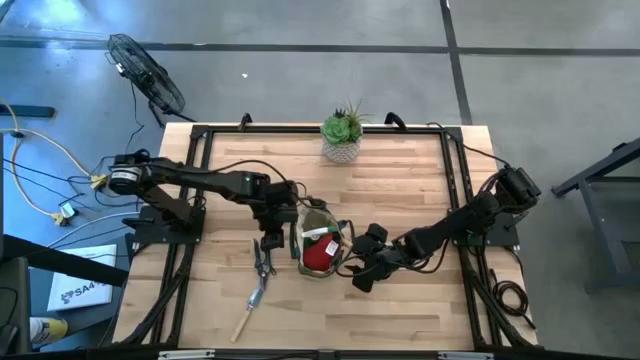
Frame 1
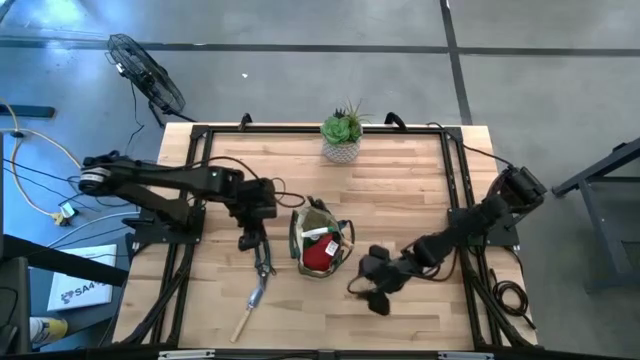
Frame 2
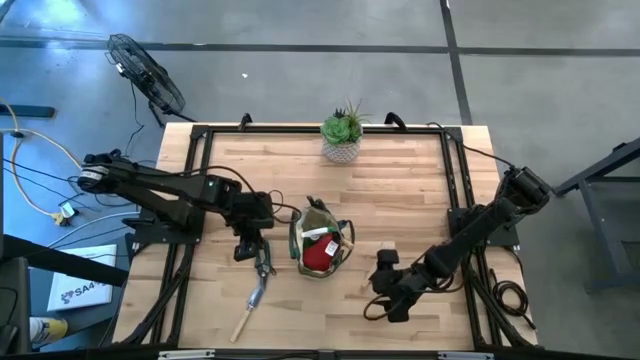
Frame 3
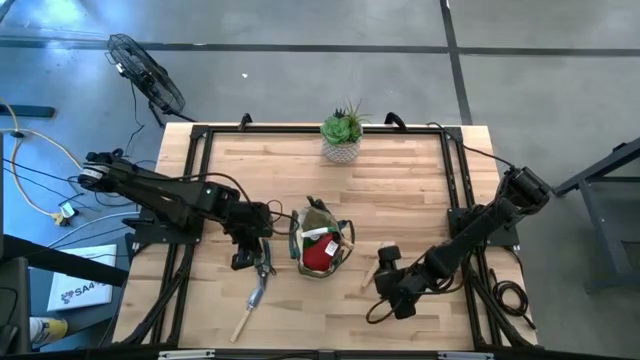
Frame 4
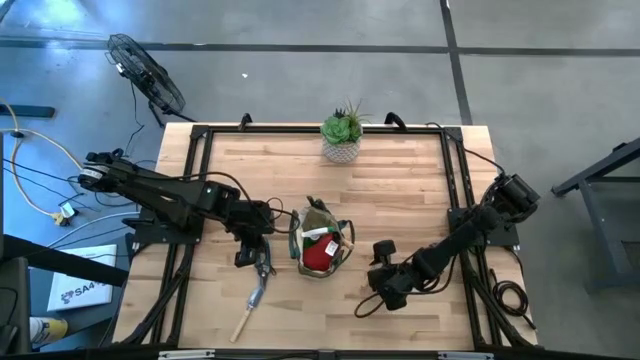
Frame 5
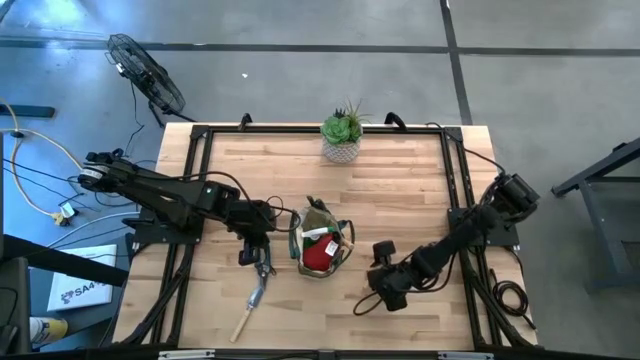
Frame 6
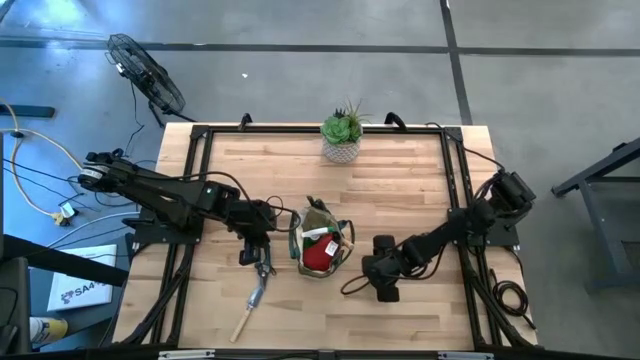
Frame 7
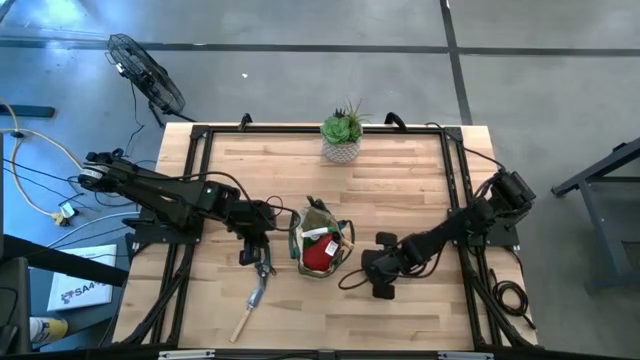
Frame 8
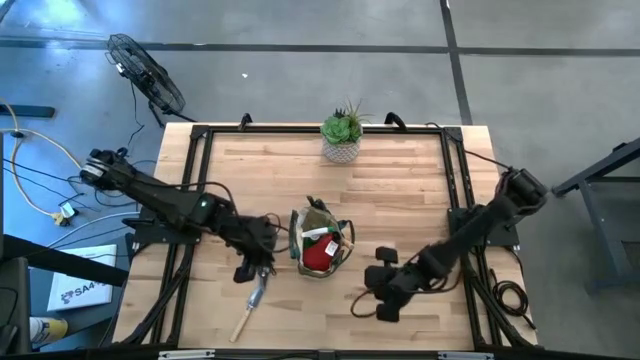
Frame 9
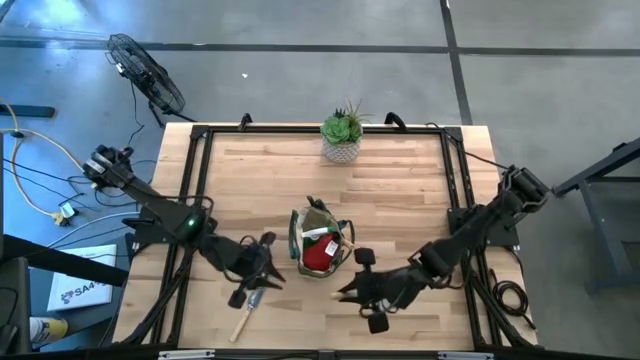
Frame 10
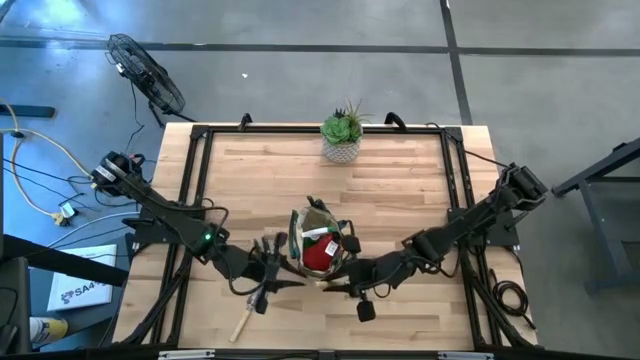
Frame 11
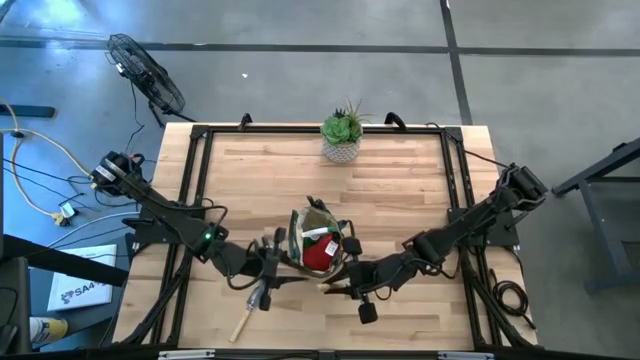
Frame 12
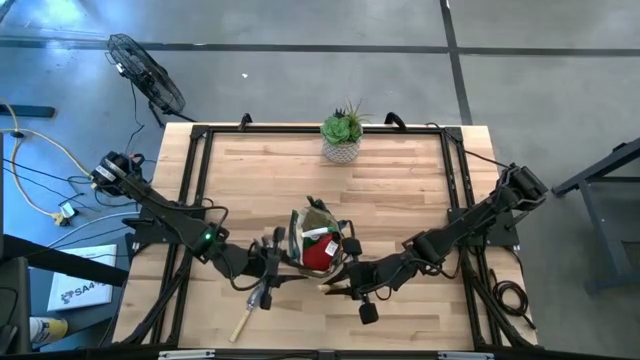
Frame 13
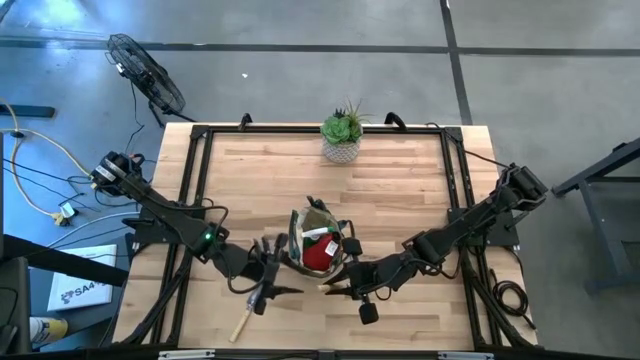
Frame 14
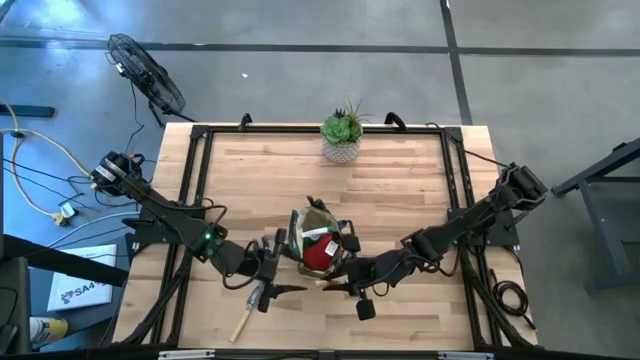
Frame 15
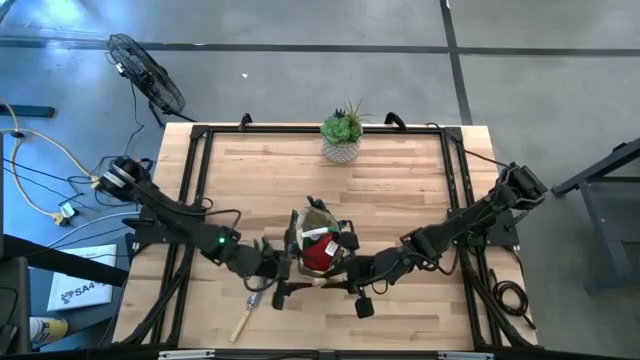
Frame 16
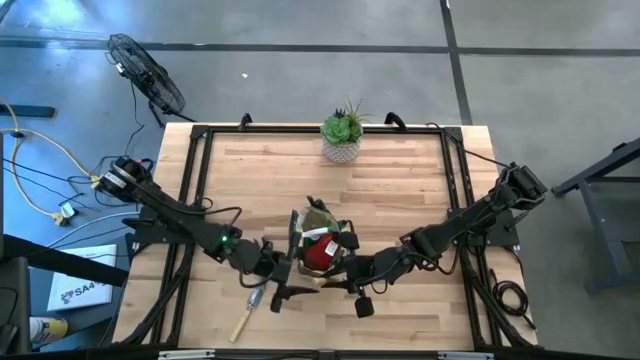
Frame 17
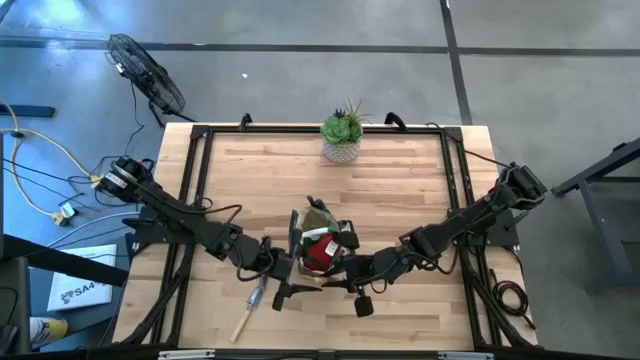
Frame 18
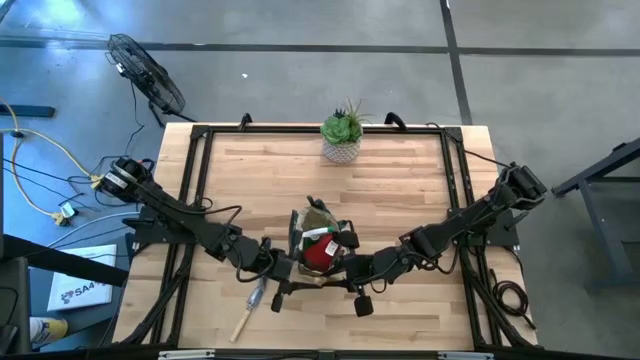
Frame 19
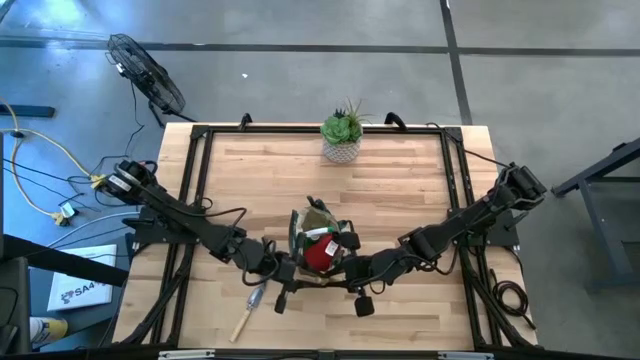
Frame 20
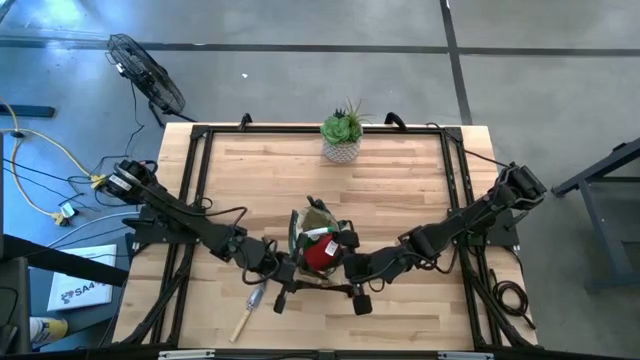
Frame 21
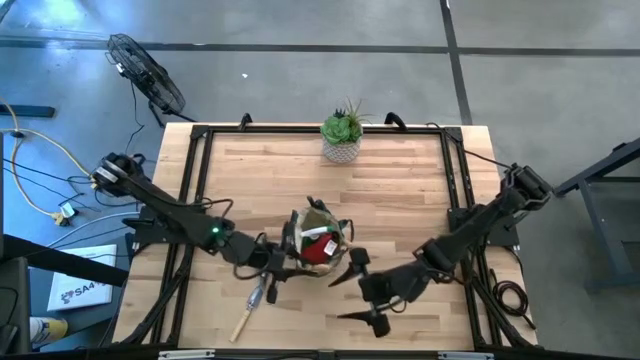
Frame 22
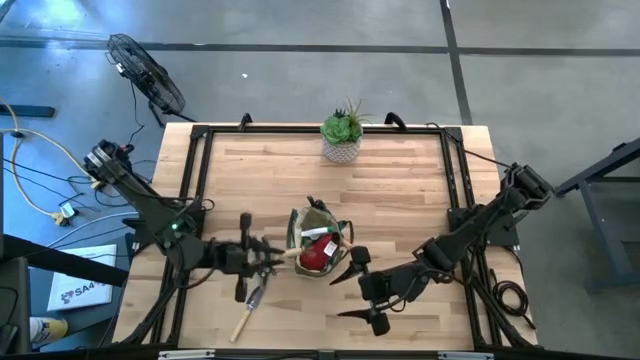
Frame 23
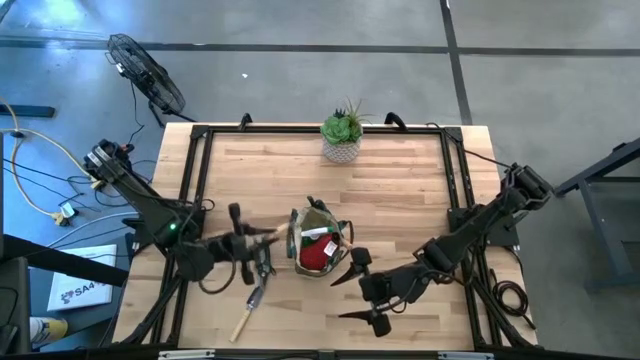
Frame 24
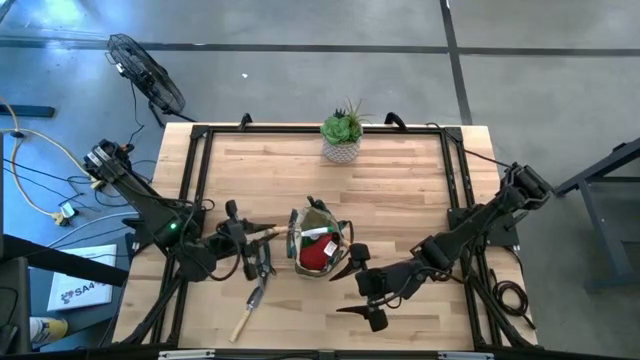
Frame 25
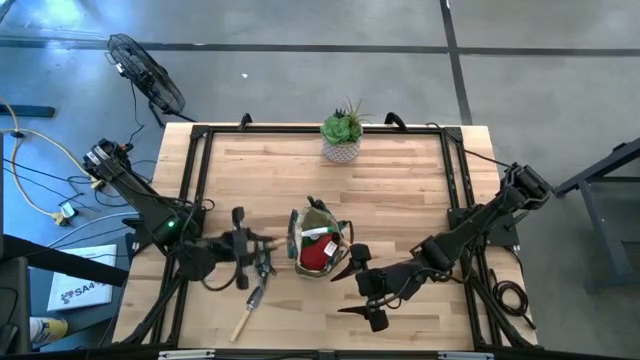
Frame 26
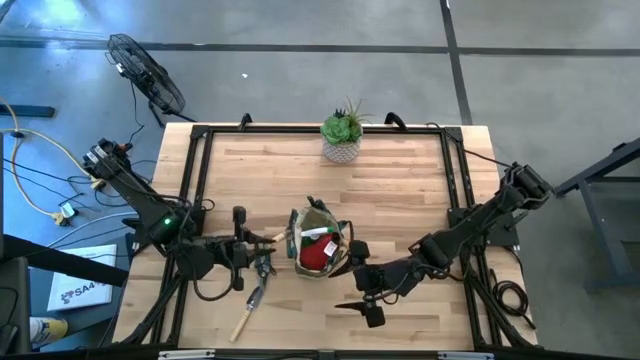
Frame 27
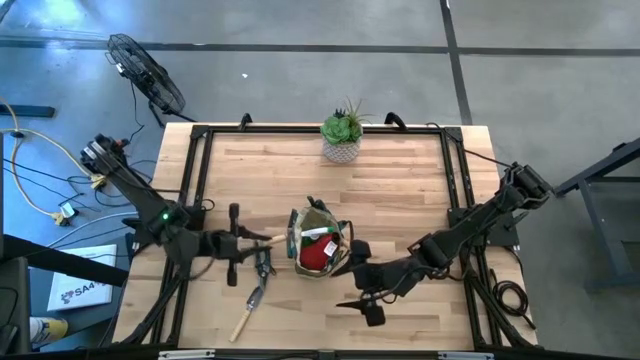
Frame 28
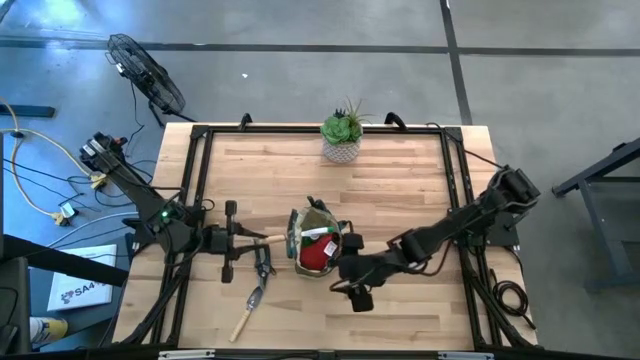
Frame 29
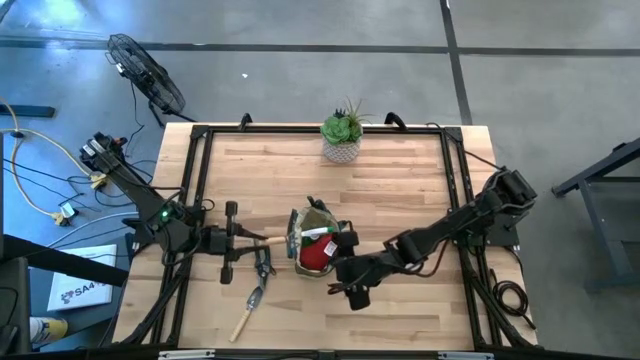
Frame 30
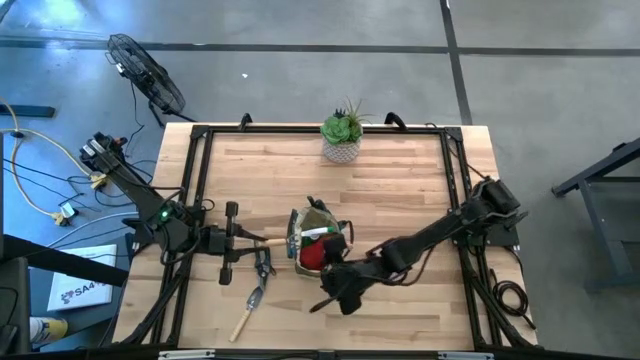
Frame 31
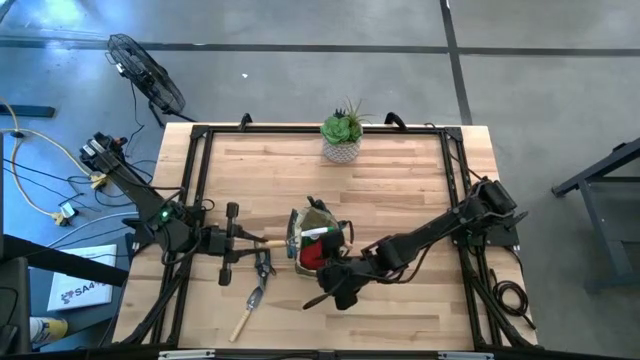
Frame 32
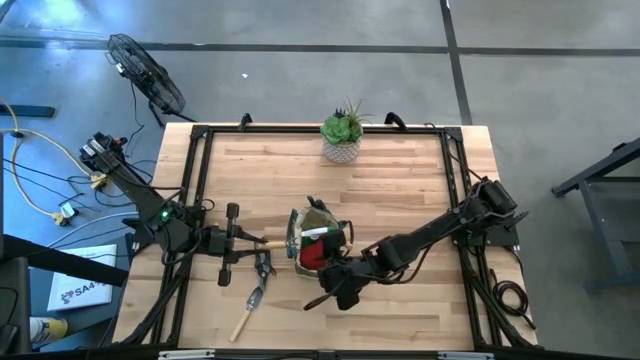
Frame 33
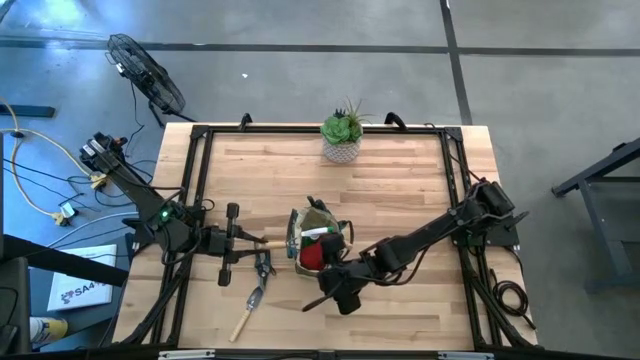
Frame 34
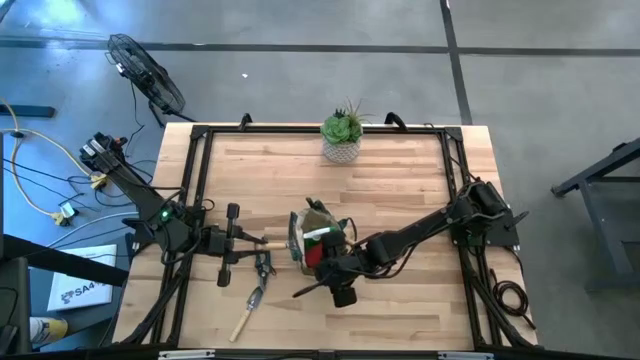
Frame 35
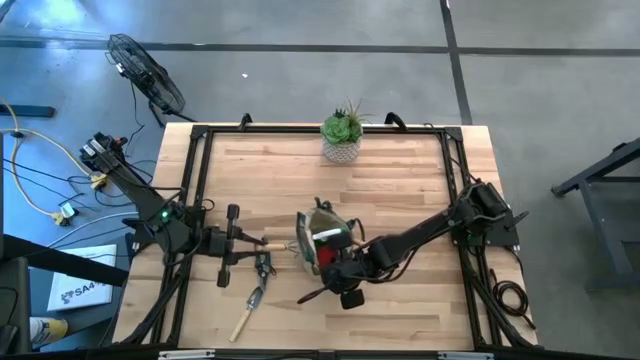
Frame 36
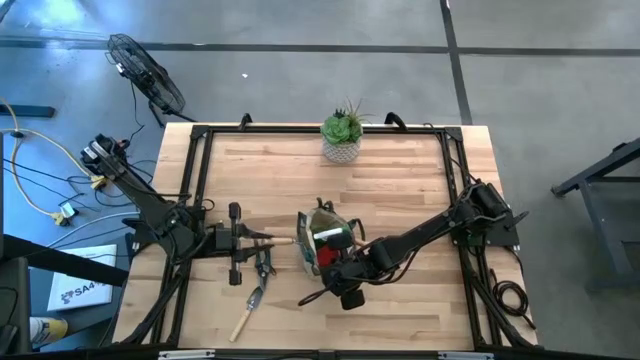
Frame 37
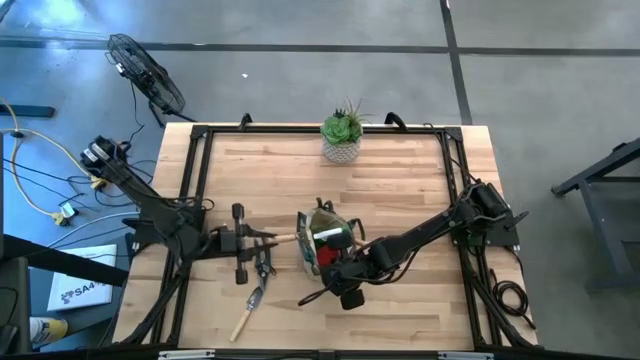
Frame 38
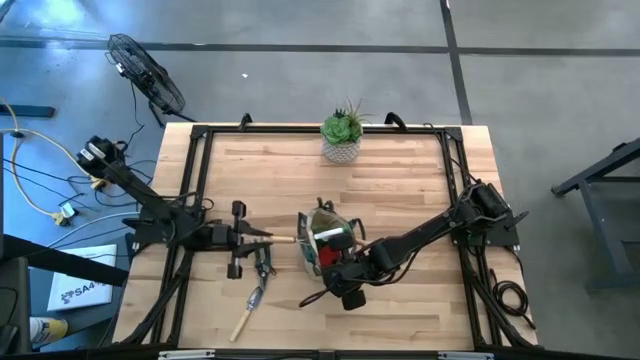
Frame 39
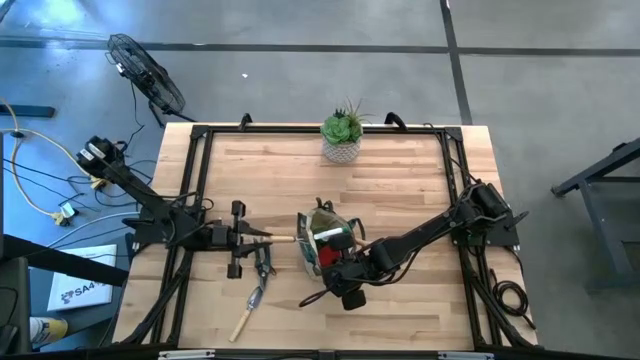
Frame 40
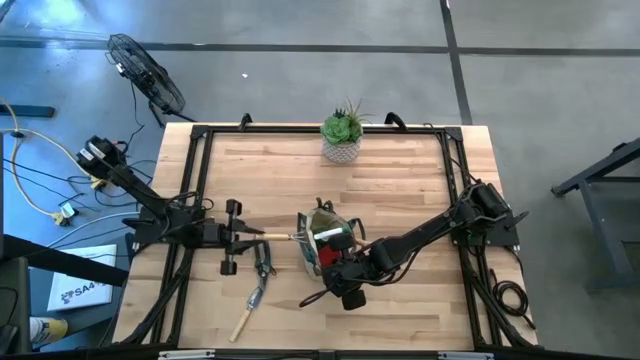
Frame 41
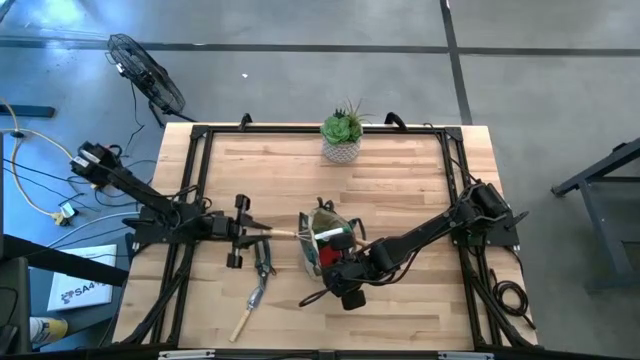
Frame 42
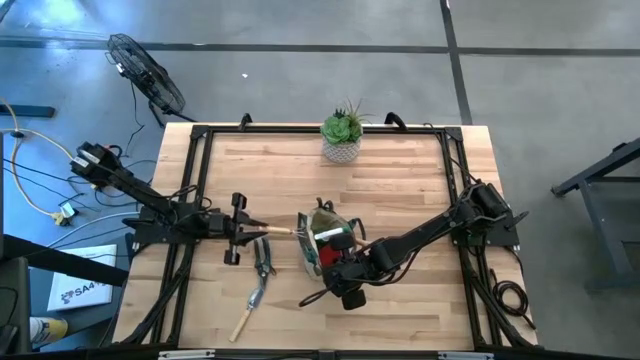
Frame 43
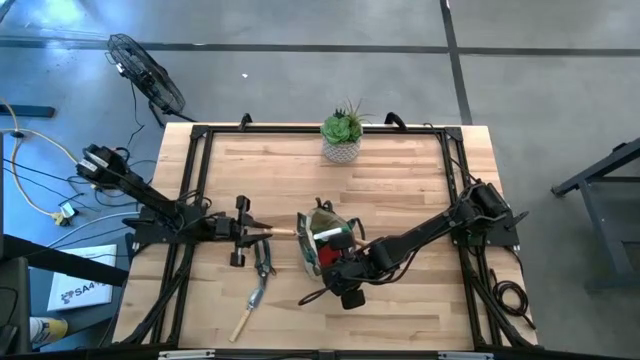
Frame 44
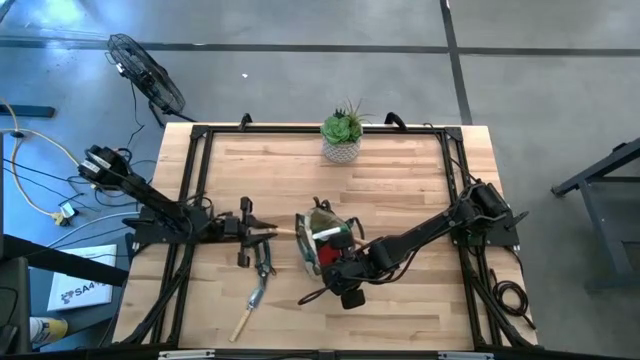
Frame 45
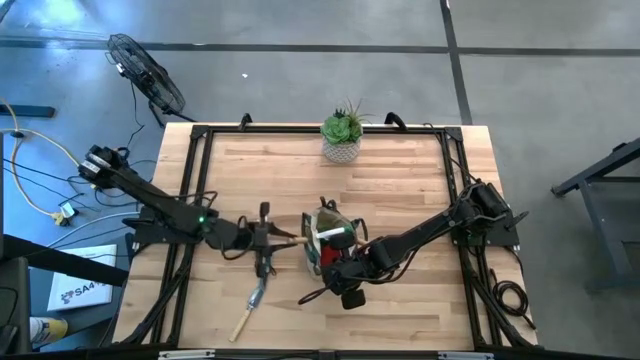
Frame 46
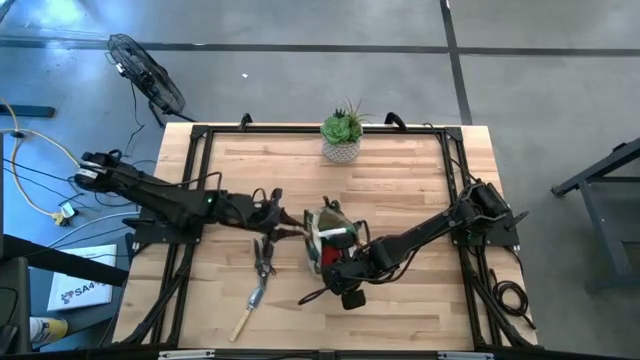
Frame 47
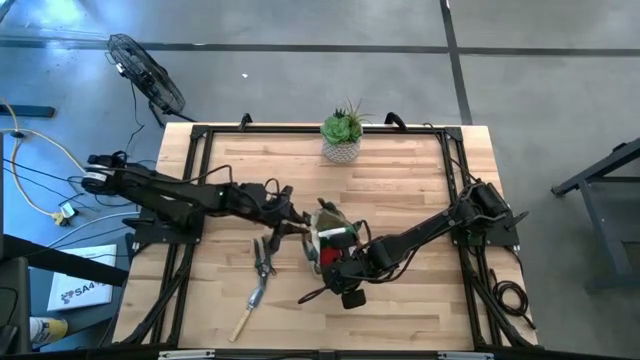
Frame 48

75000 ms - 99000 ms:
Task: Pick & Place Garden tools in Gardening bag
Put the hand rake into the gardening bag
